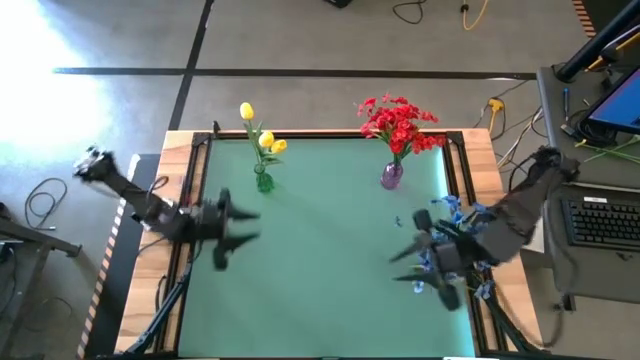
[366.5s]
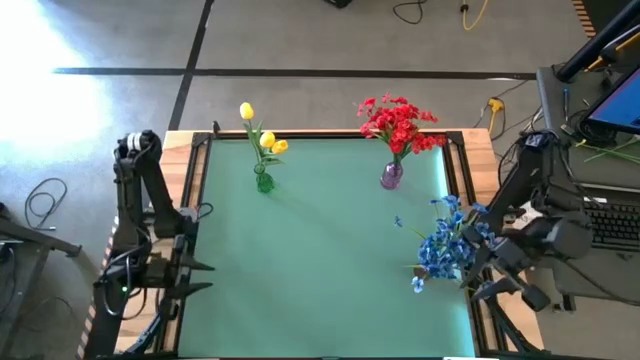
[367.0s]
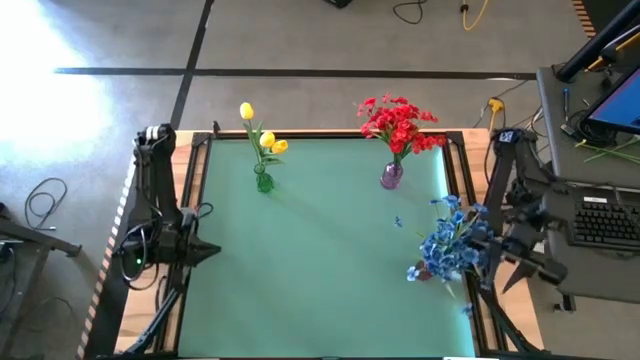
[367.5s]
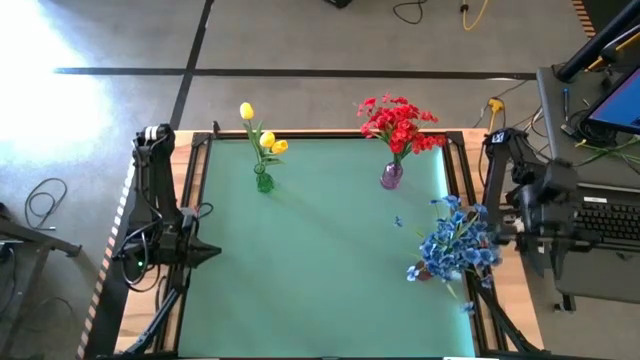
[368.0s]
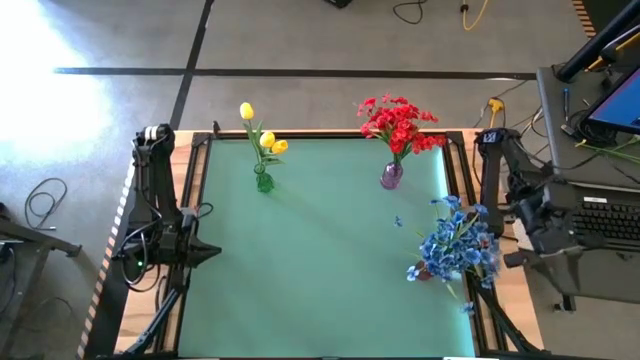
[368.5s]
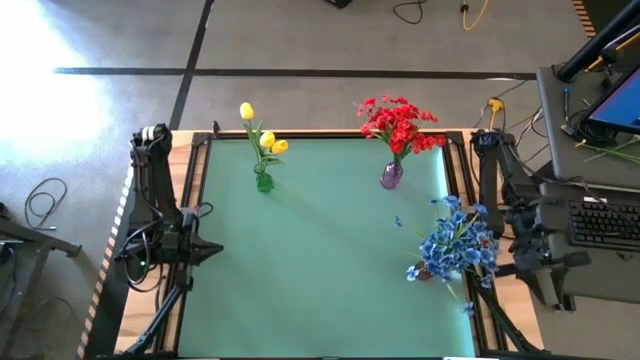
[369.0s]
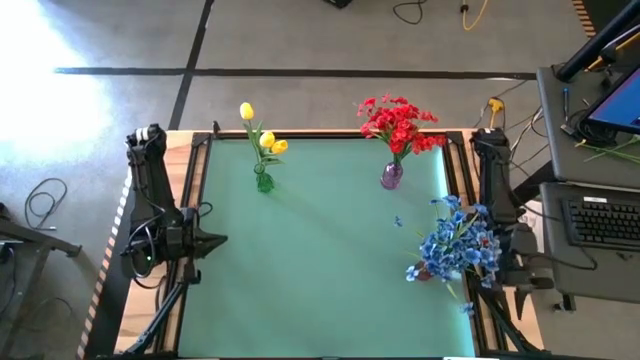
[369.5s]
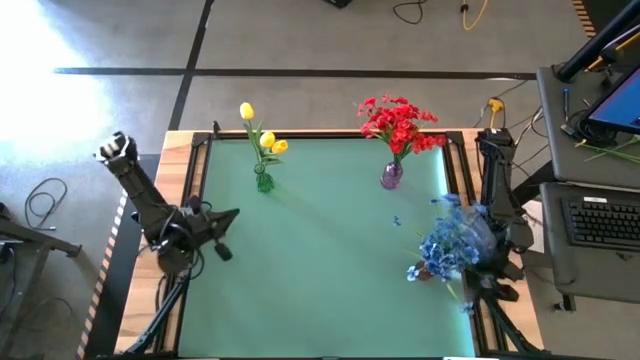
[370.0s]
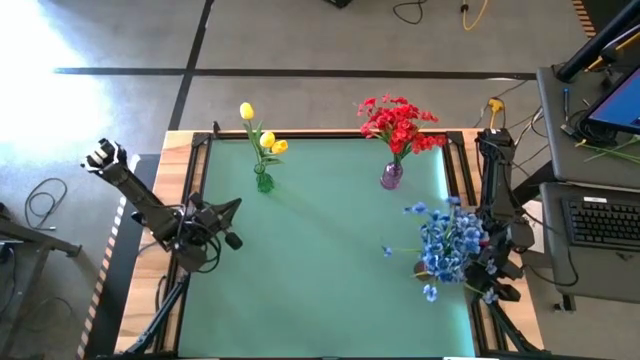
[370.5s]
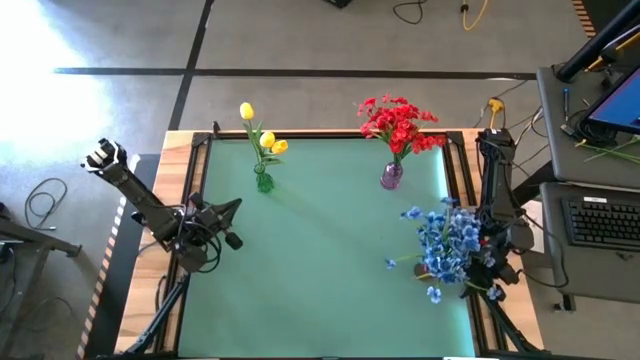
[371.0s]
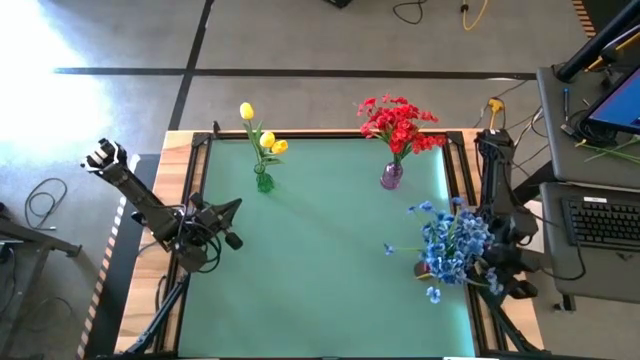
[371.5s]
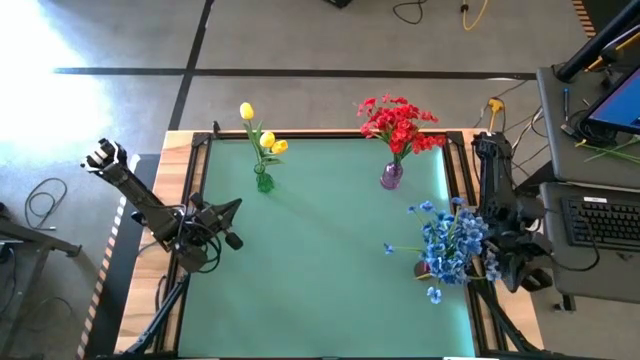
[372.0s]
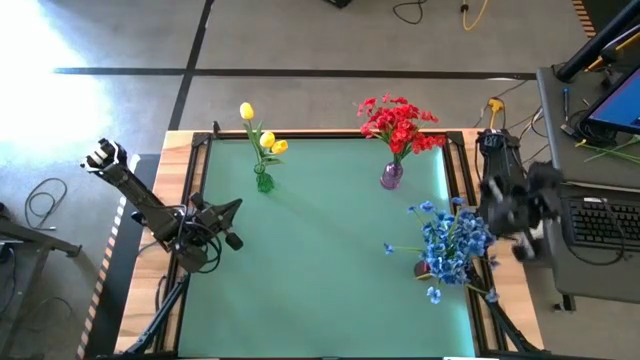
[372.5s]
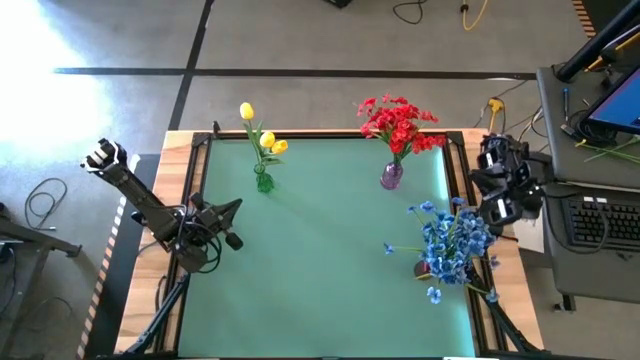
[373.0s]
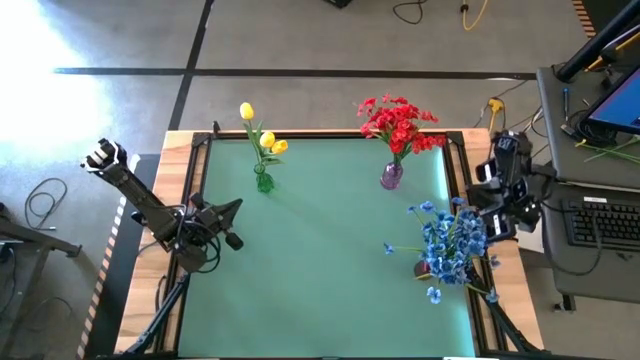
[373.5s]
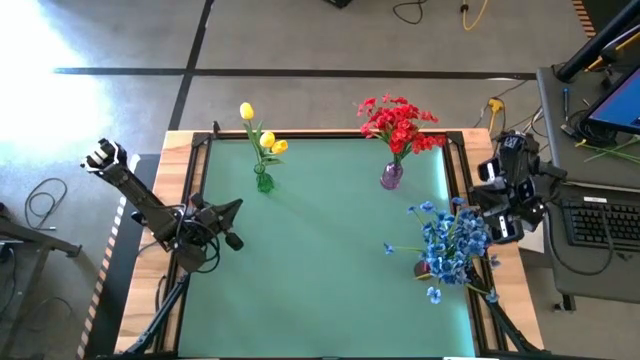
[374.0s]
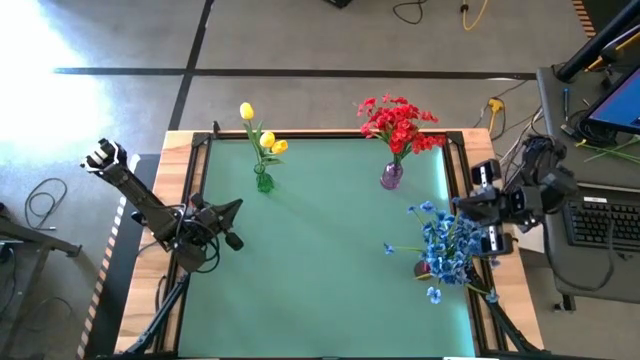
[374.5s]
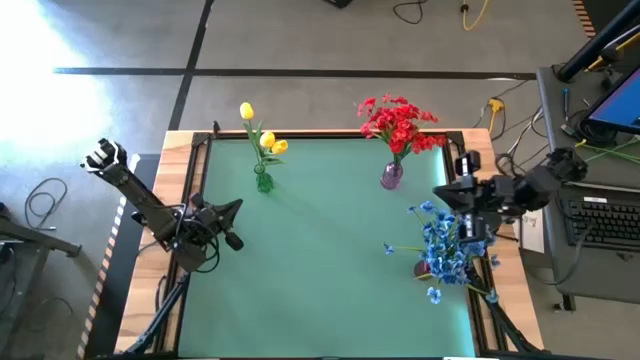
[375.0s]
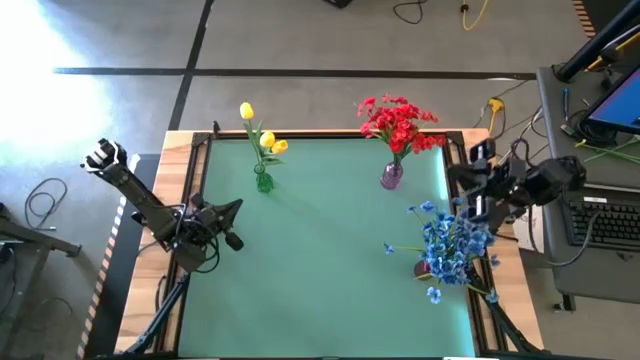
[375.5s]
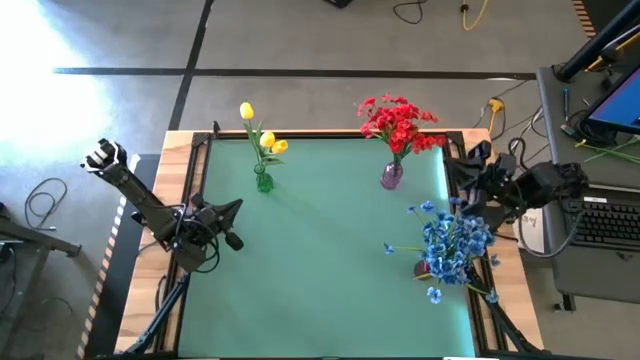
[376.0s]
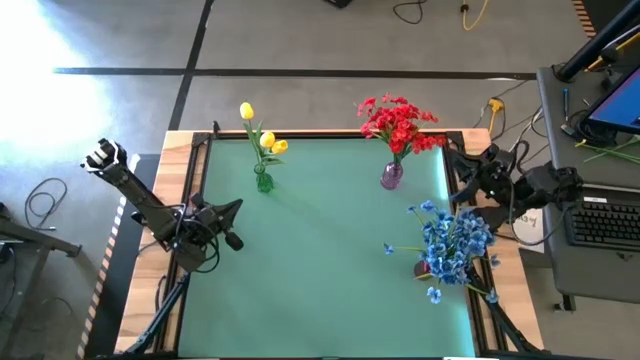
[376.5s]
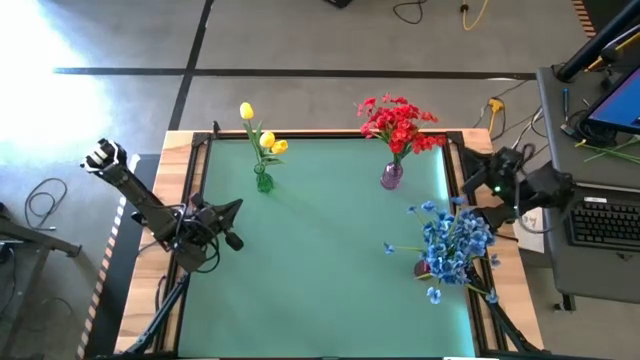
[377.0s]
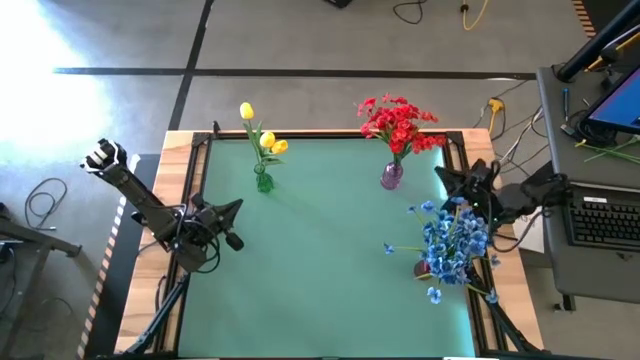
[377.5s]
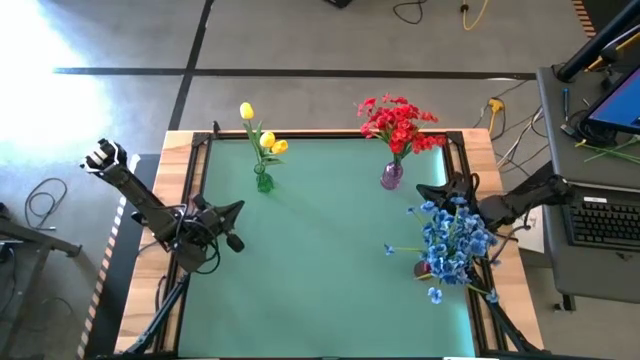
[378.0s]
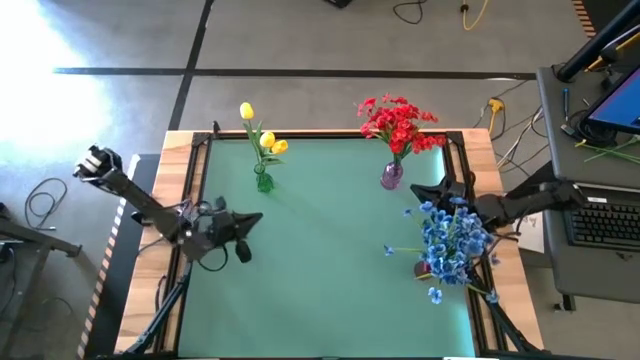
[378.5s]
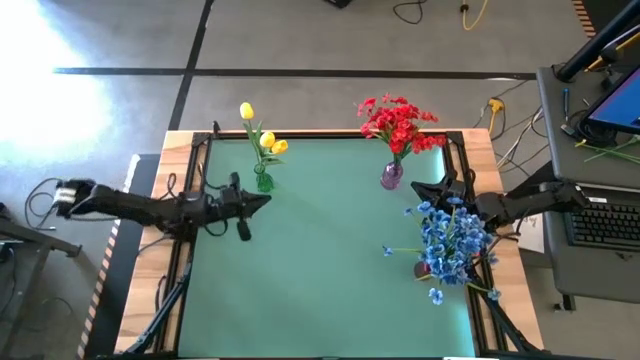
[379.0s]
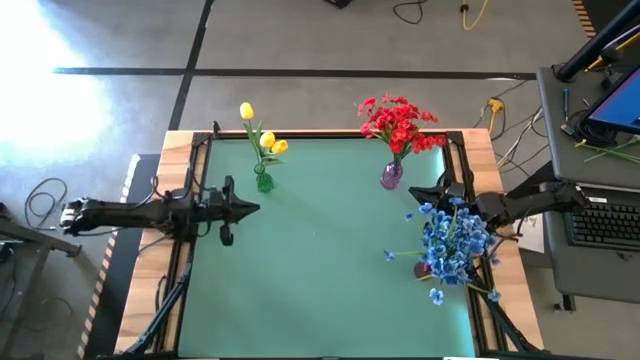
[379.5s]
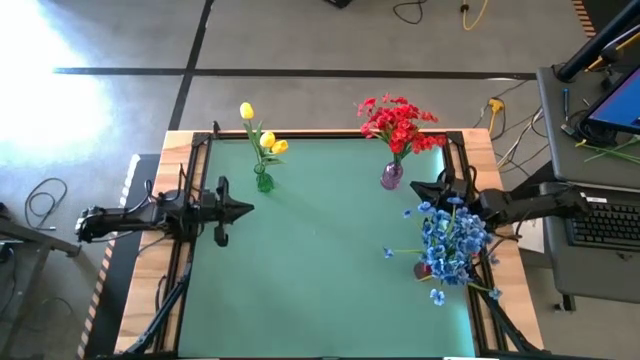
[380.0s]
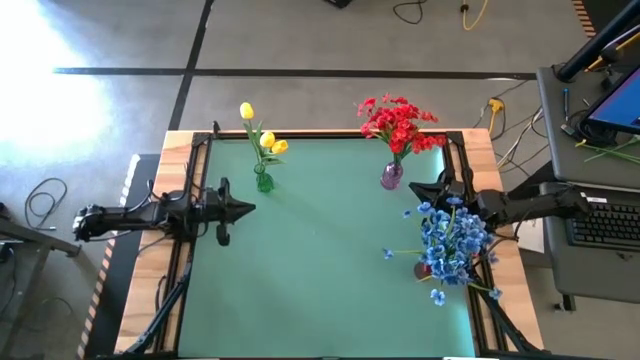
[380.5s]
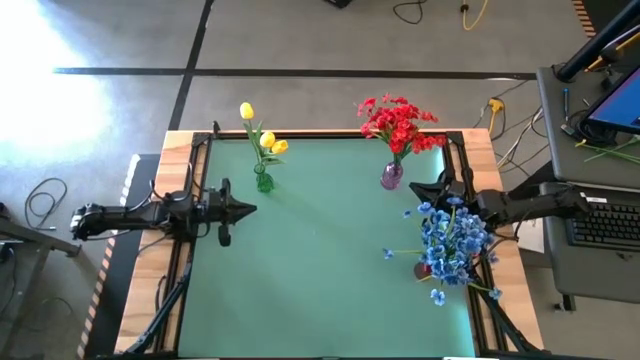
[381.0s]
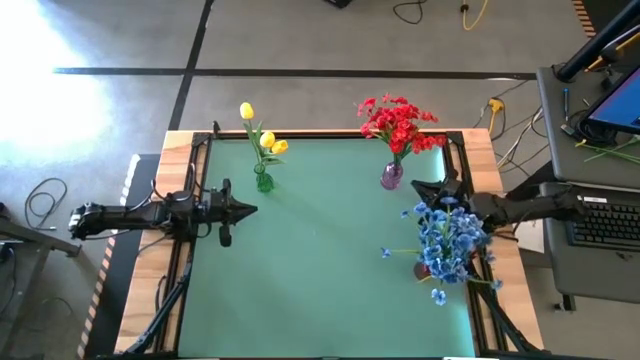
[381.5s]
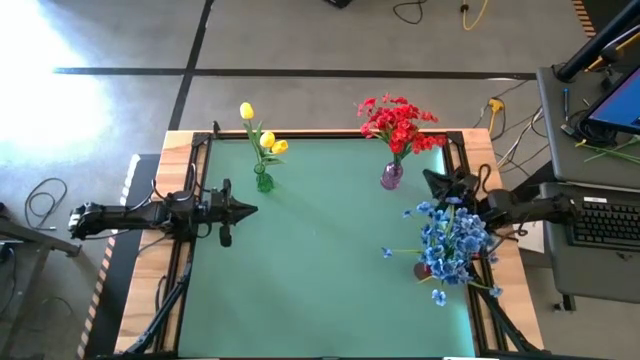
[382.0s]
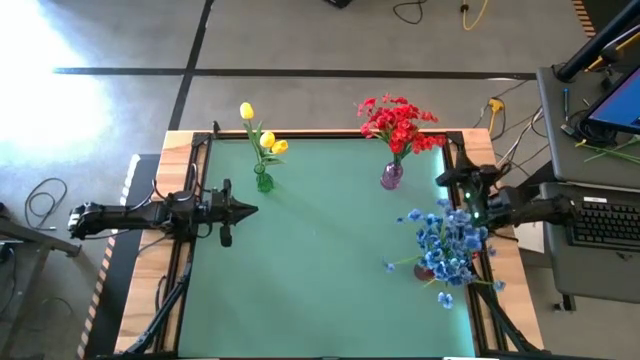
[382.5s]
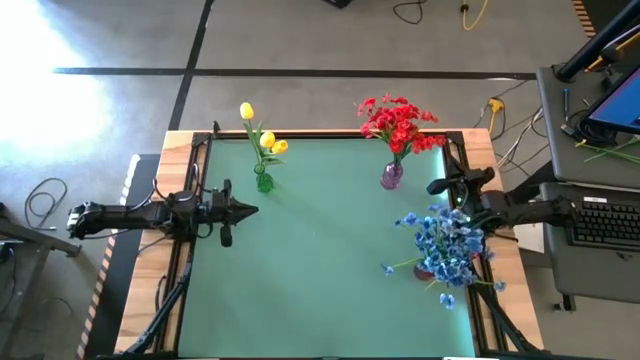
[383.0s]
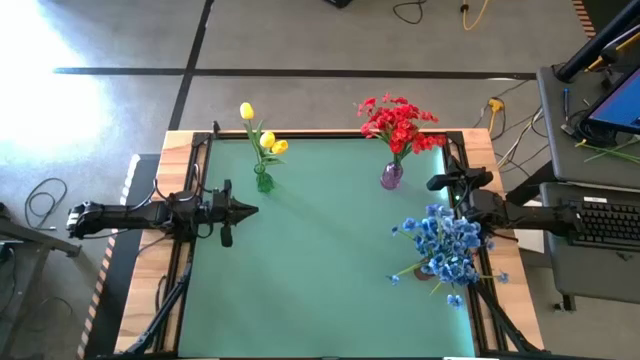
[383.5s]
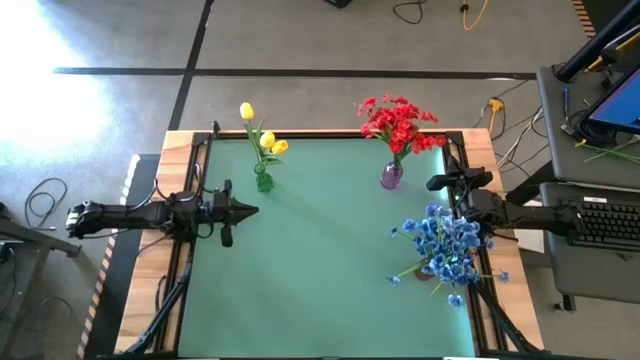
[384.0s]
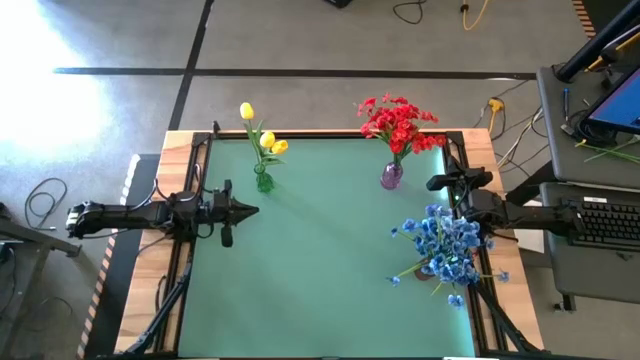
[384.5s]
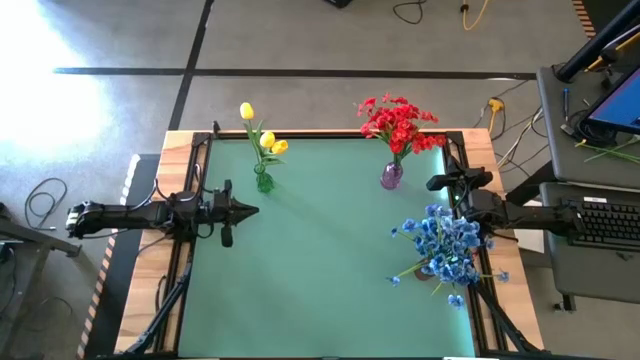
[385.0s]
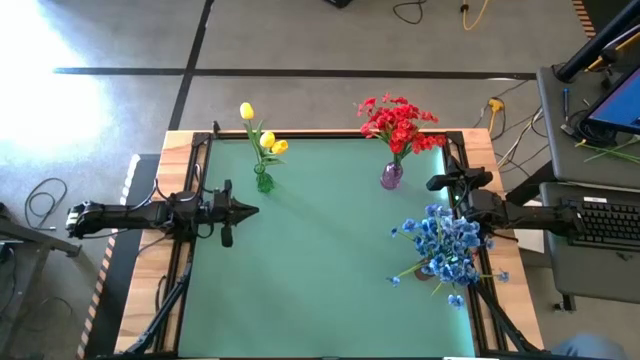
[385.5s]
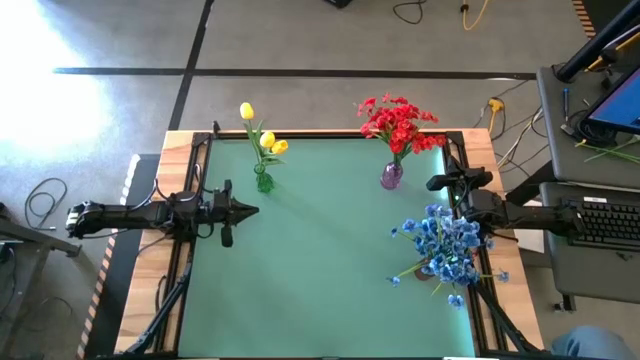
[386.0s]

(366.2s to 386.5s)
Task: Sort flowers into vase by color
Return to Home Position

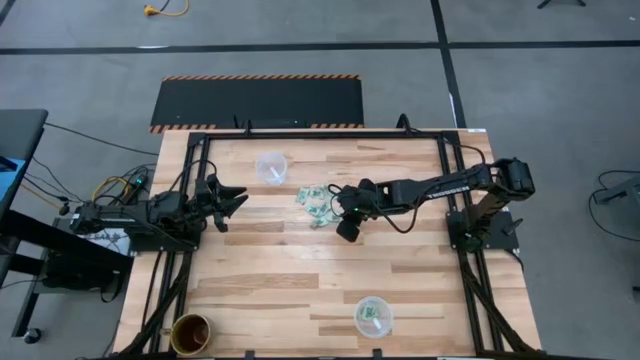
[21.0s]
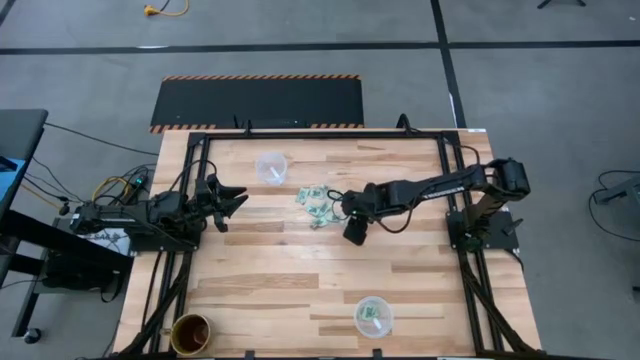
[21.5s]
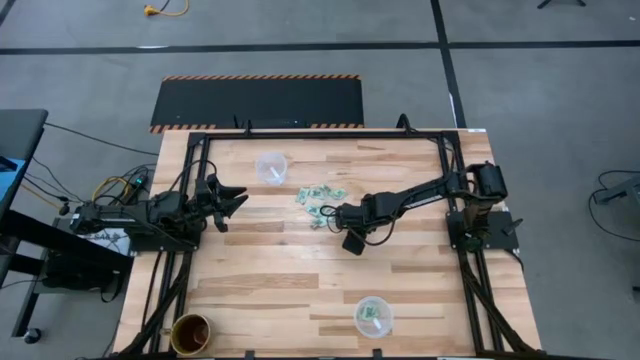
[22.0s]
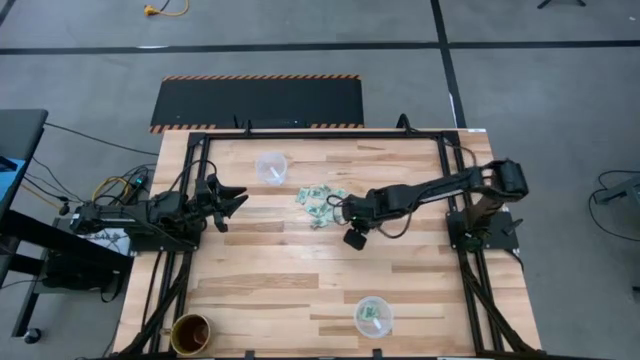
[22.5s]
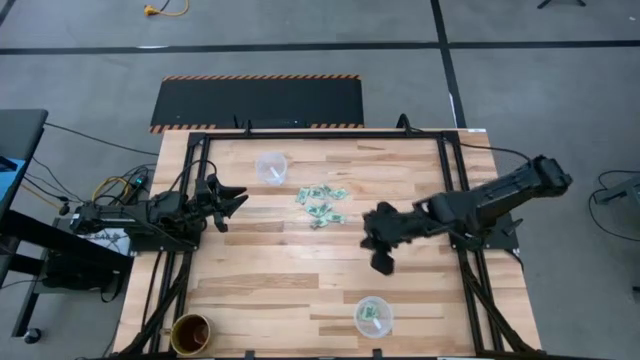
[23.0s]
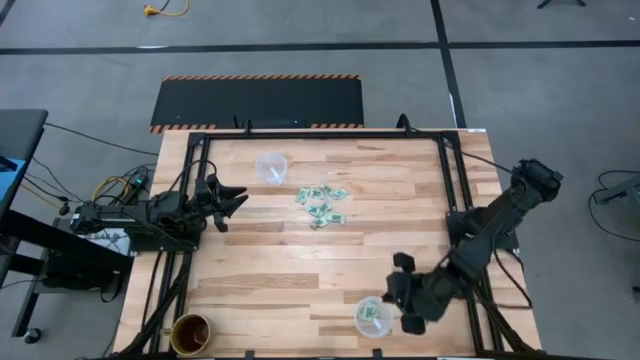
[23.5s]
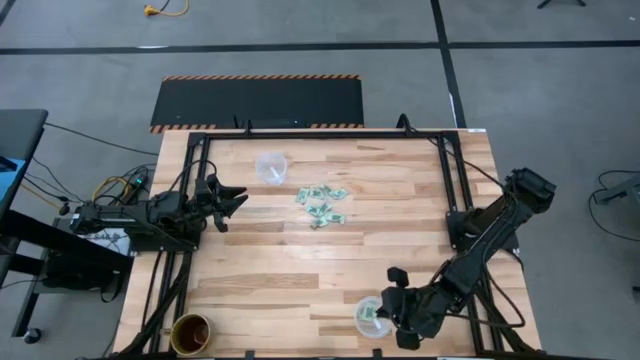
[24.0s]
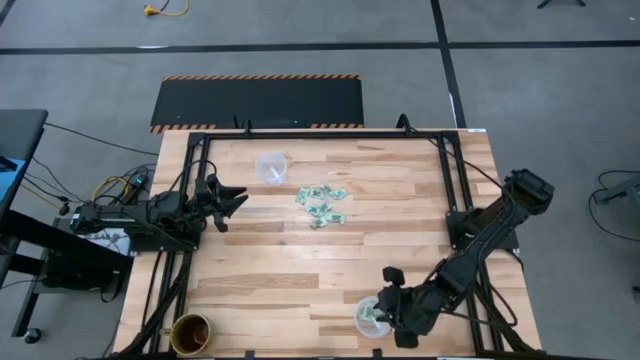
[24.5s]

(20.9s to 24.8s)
Task: Pick and place Stevia / Truvia into bins
Put the white stevia packet into the bottom transparent container
